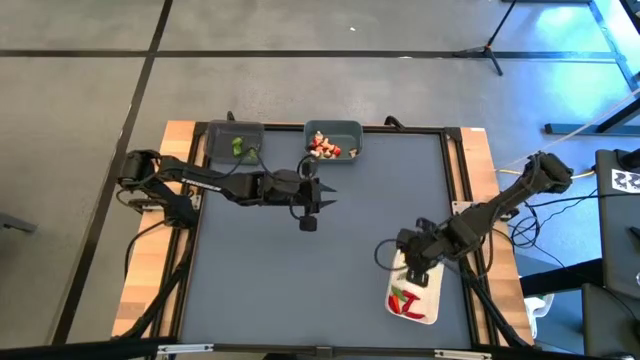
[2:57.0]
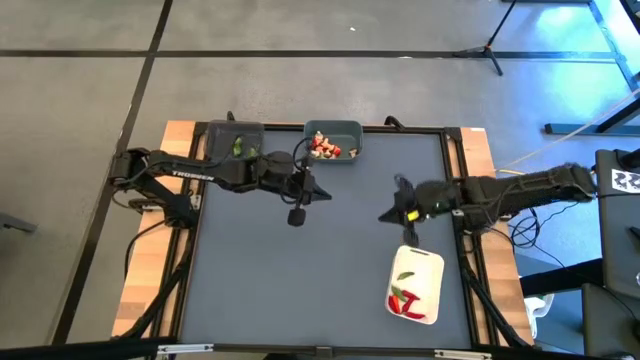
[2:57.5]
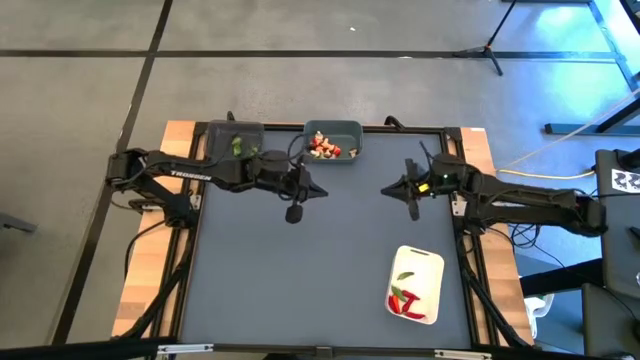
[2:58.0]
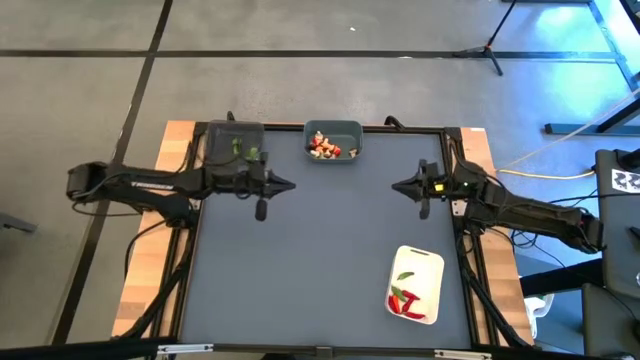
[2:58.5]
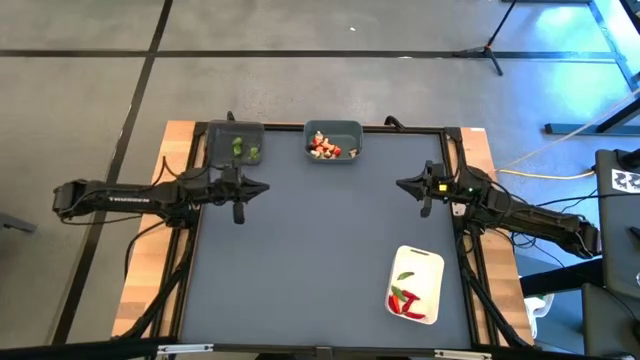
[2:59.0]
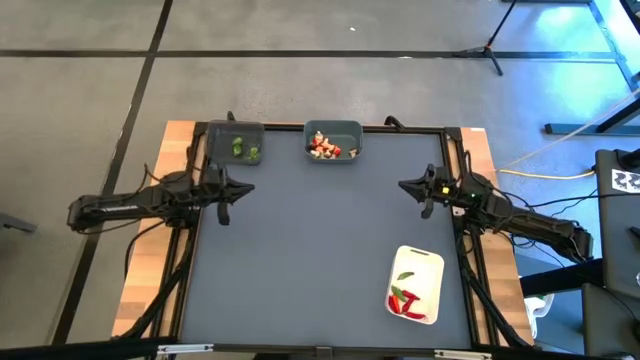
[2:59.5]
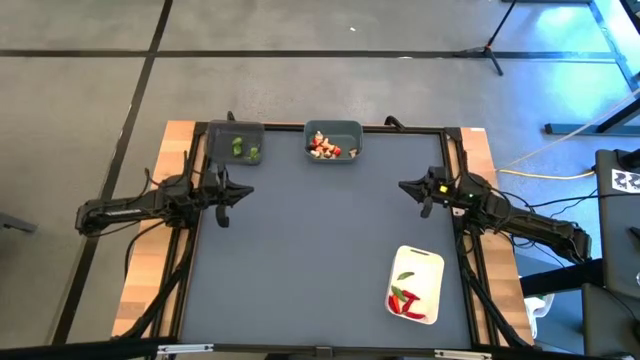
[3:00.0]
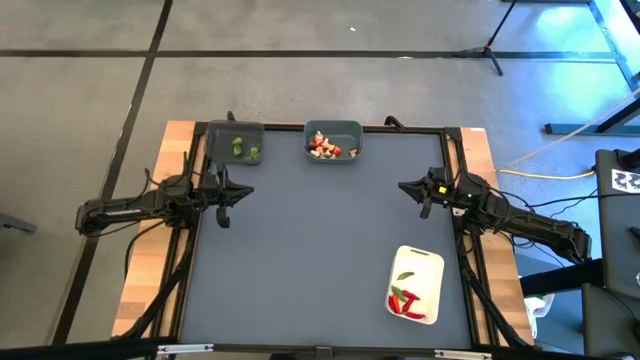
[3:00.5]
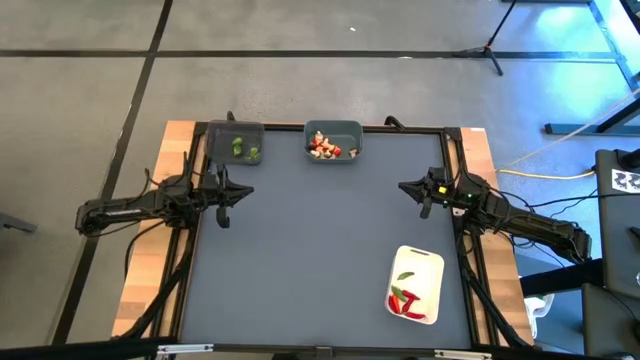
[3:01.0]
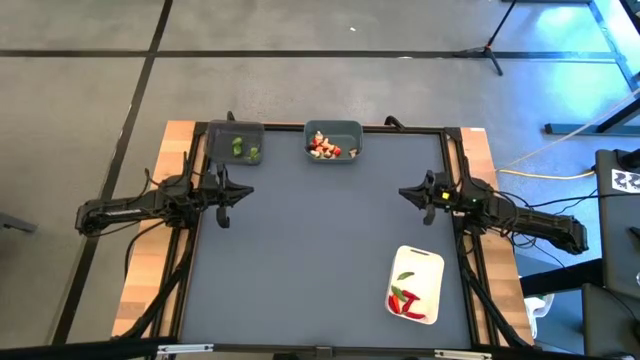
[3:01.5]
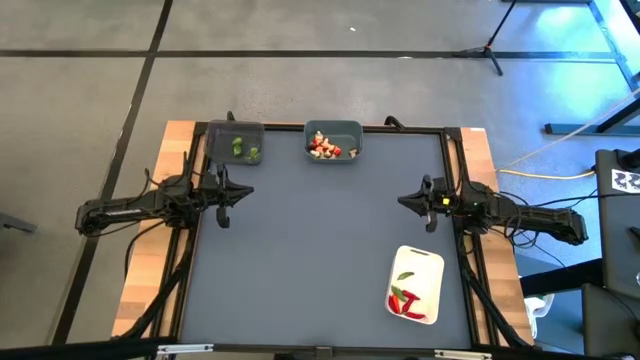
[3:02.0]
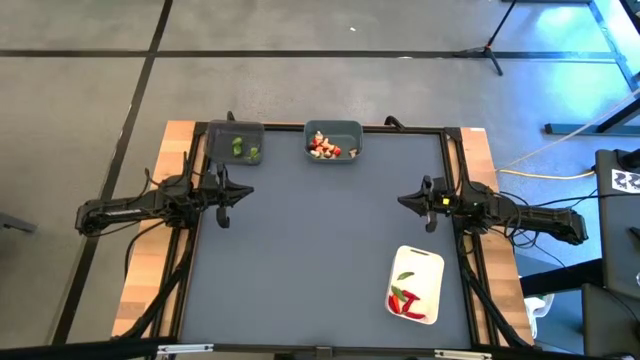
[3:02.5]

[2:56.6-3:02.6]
Task: Sort produce into baskets
Return to Home Position

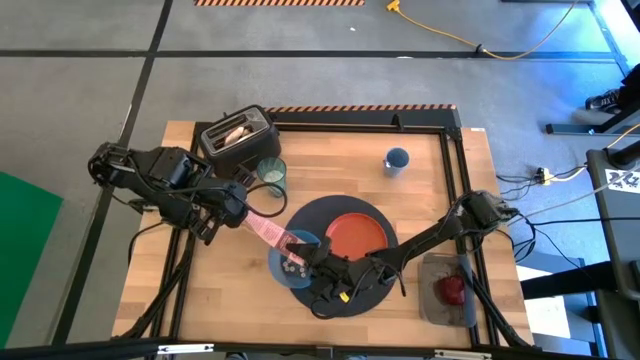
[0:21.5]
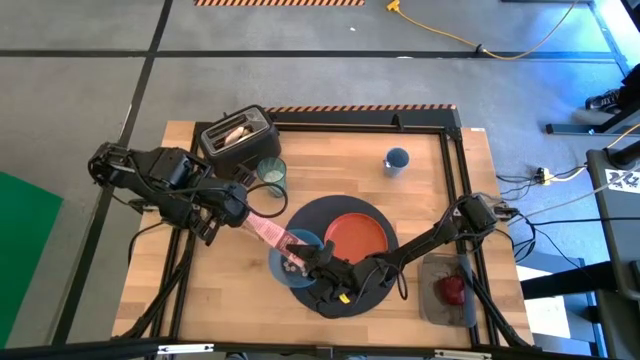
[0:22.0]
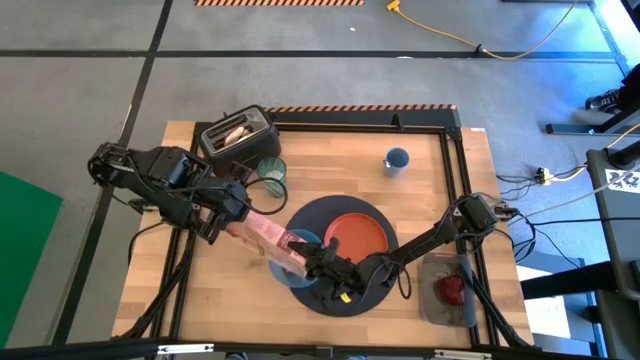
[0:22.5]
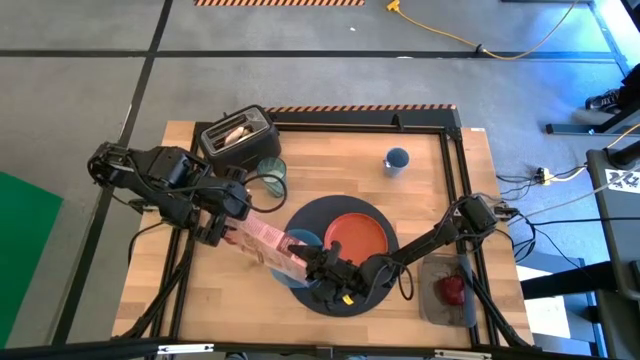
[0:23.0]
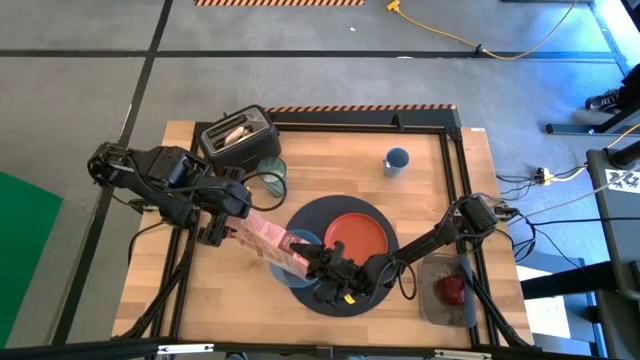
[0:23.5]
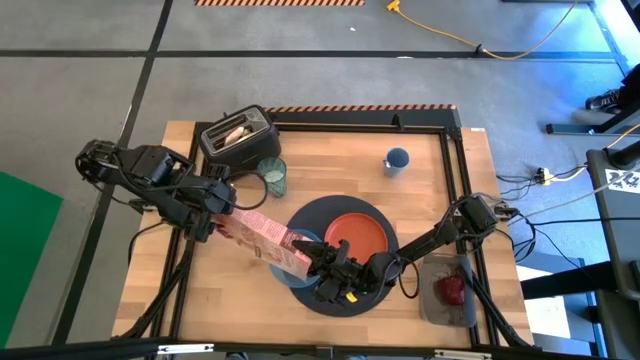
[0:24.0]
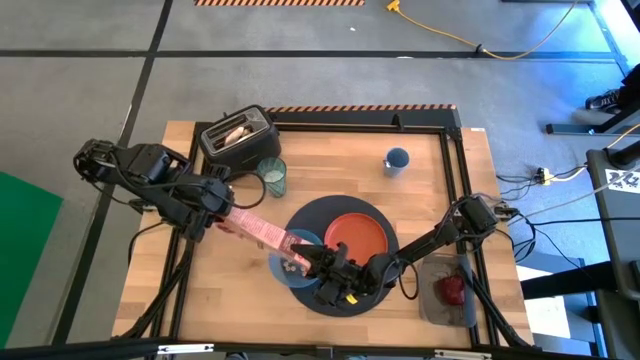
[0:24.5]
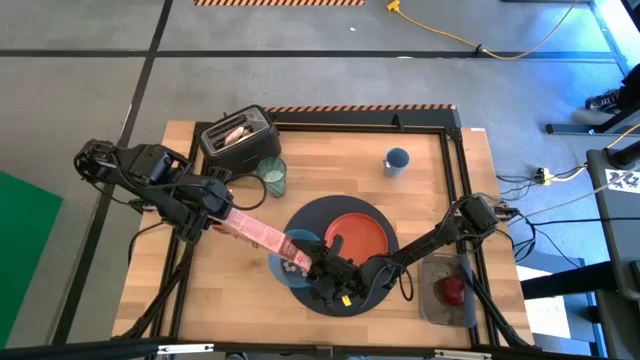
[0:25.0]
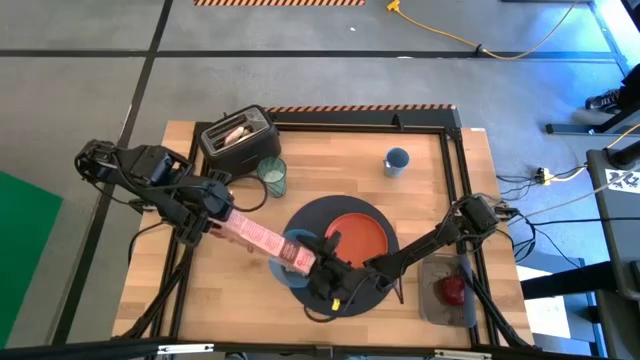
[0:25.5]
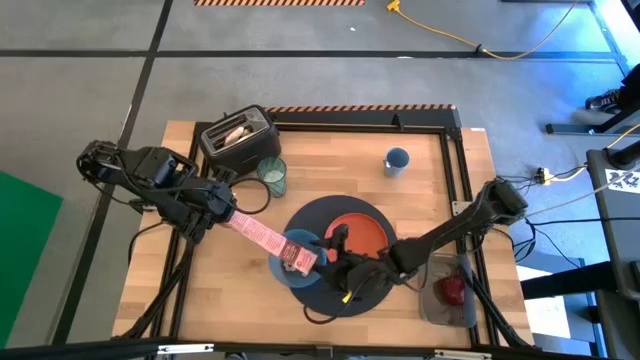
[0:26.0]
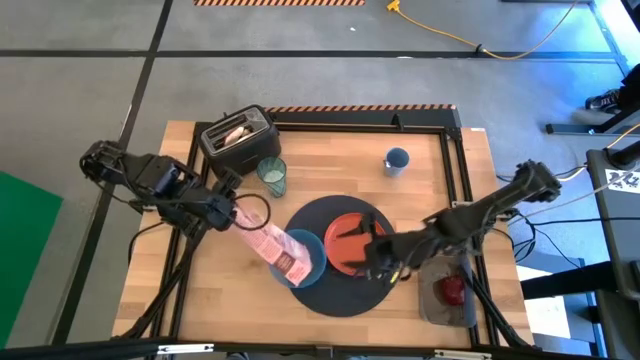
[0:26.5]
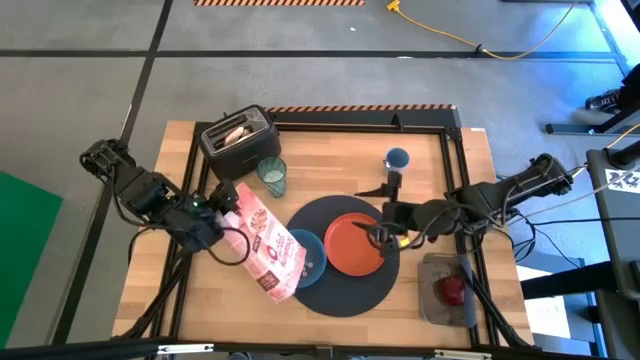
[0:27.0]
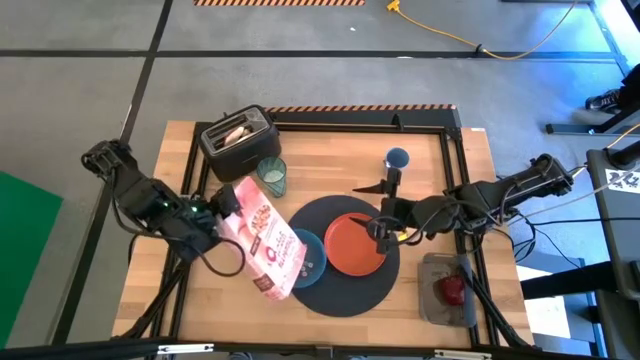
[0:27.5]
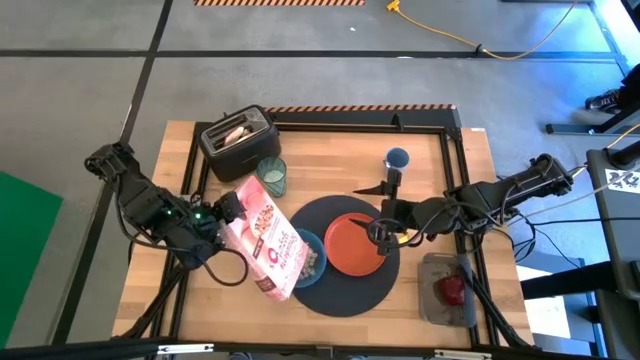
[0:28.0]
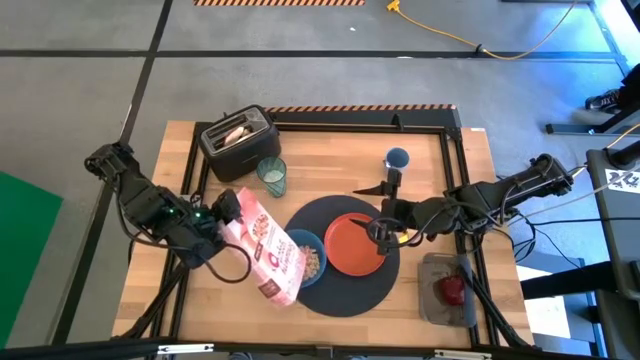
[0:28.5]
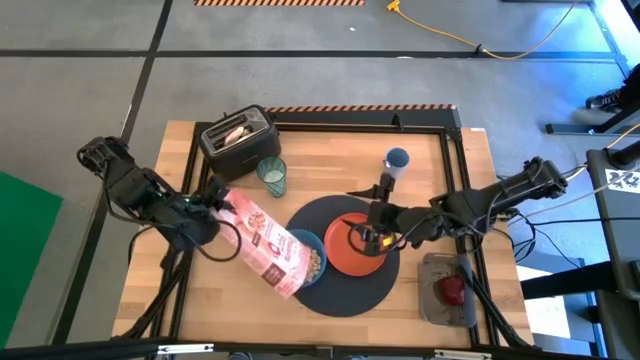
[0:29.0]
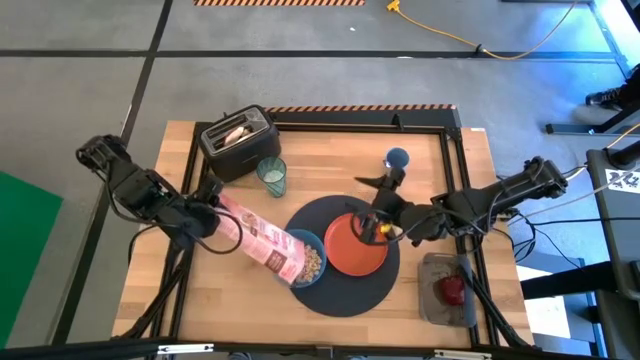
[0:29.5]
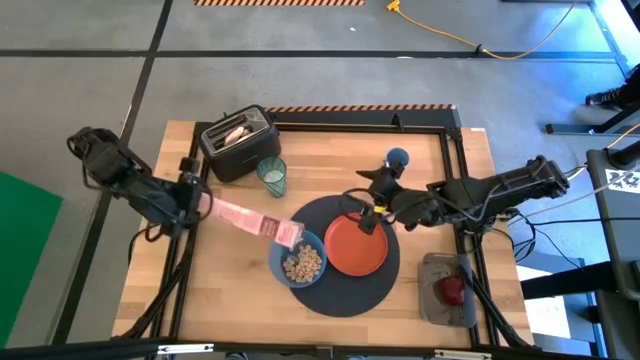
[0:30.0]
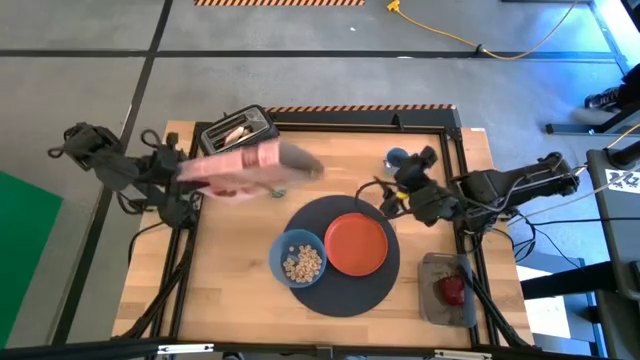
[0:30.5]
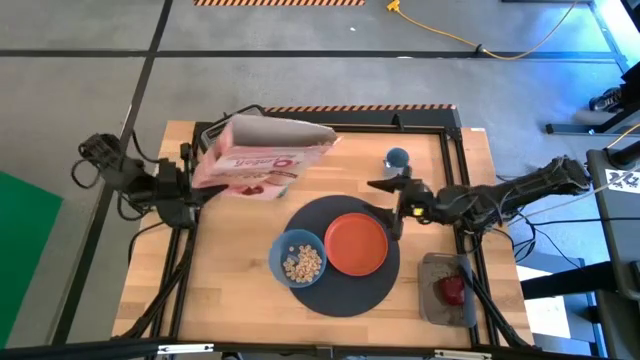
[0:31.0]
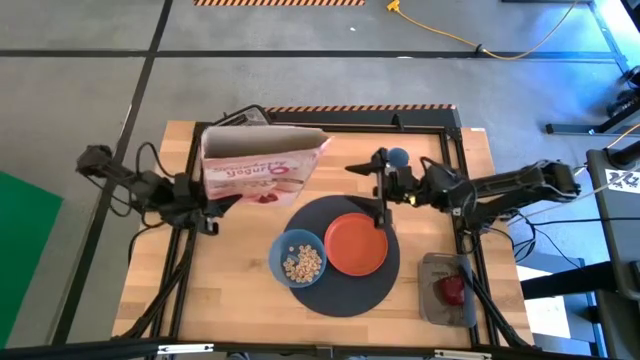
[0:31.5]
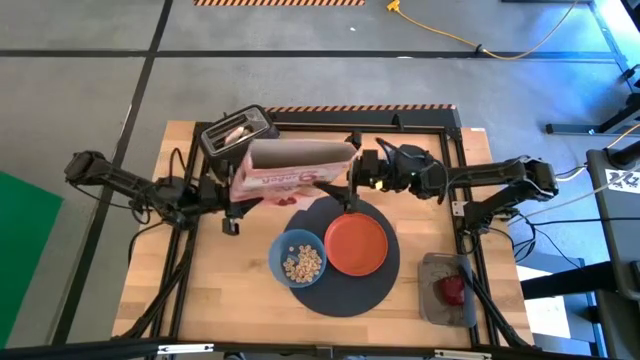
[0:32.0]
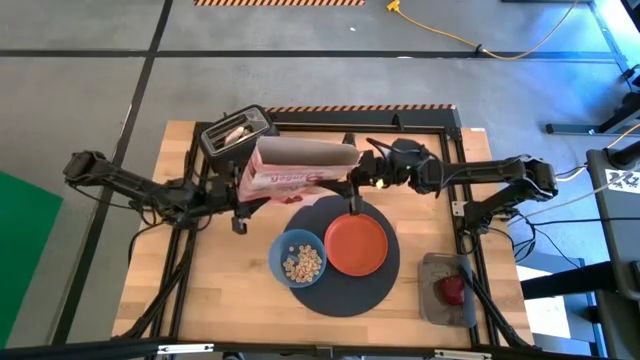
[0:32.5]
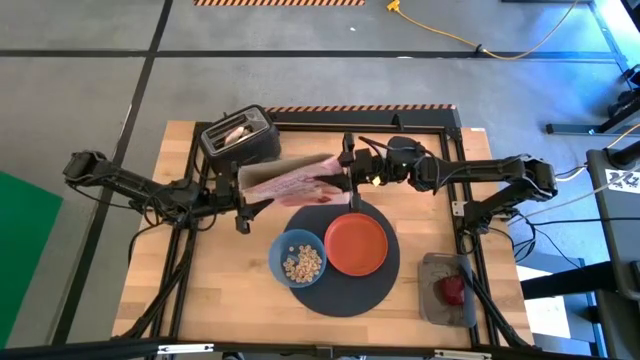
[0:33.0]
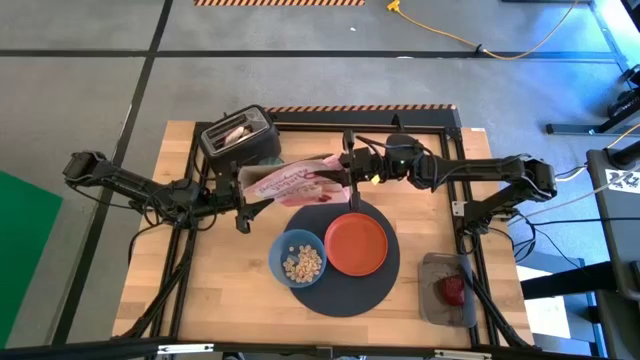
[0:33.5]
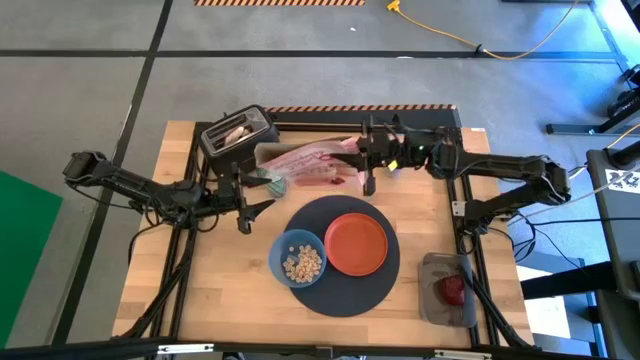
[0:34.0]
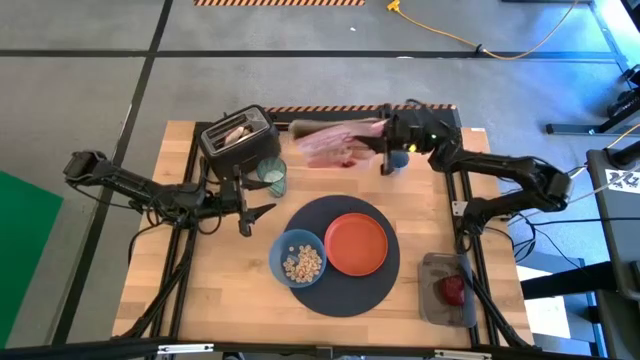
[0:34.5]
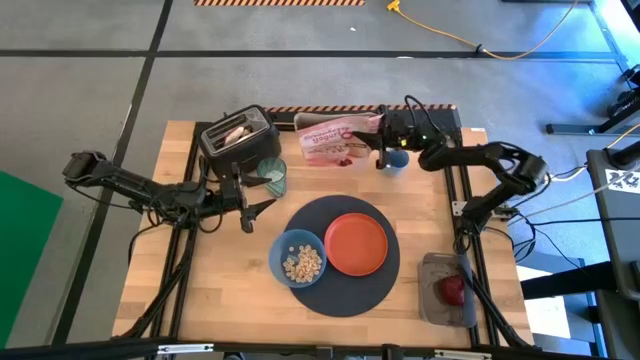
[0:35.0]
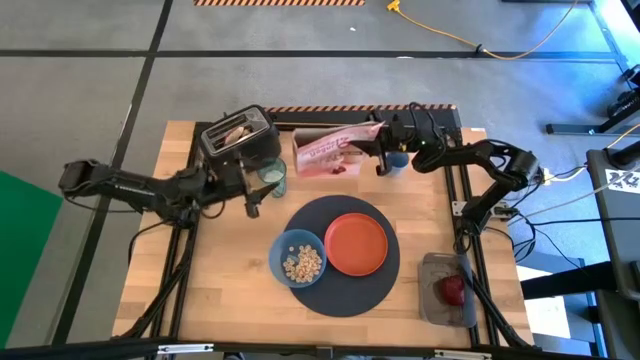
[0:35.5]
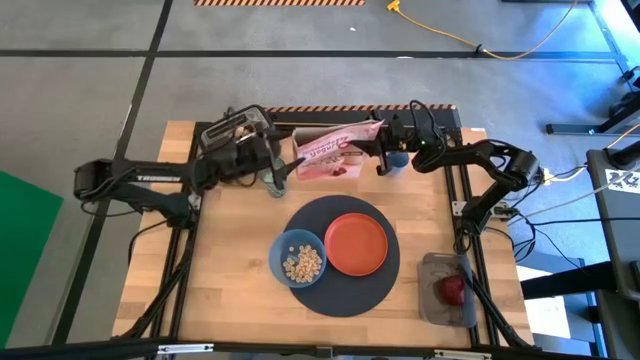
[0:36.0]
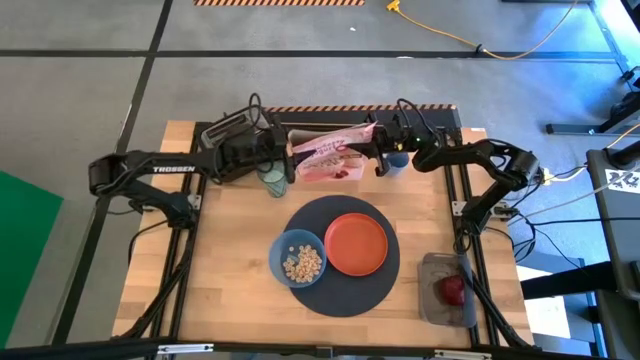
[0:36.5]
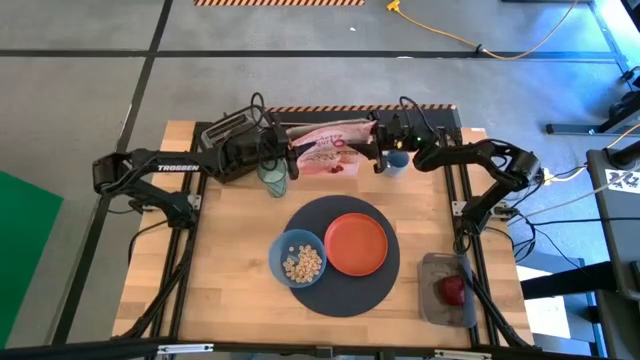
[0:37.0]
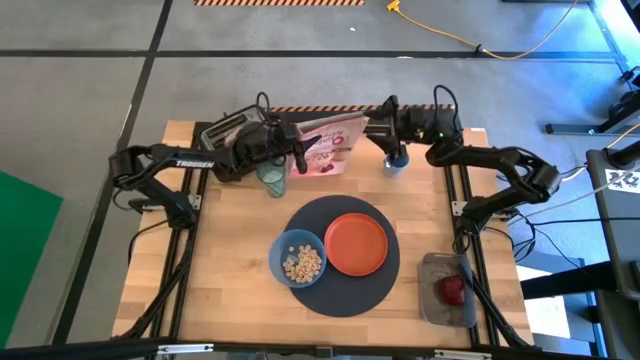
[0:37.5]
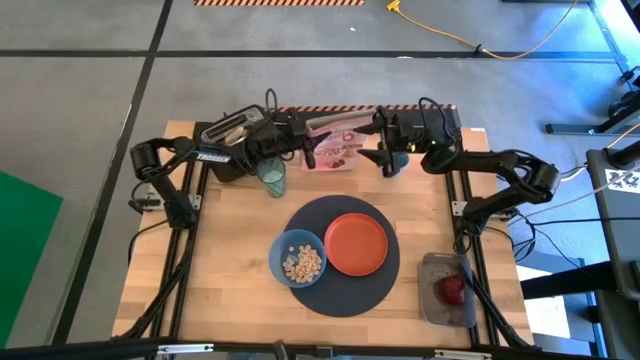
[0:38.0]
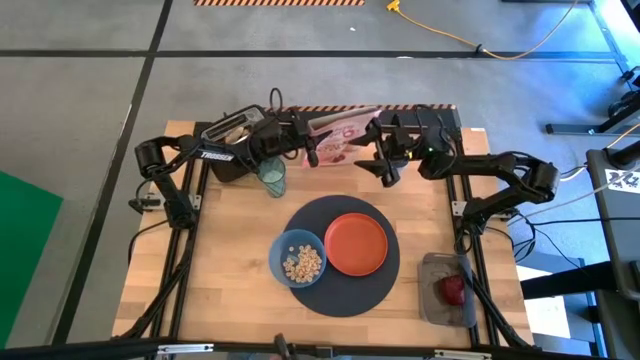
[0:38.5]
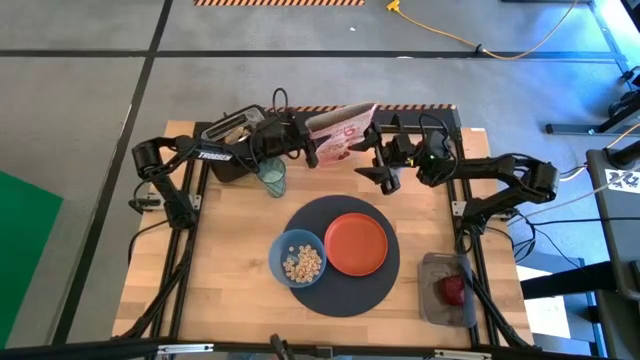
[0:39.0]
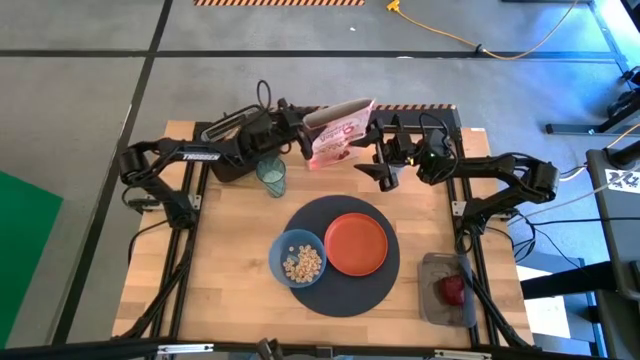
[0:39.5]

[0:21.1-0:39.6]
Task: Arrange a breakfast setting
Pour the cereal from the cereal box into the bowl
